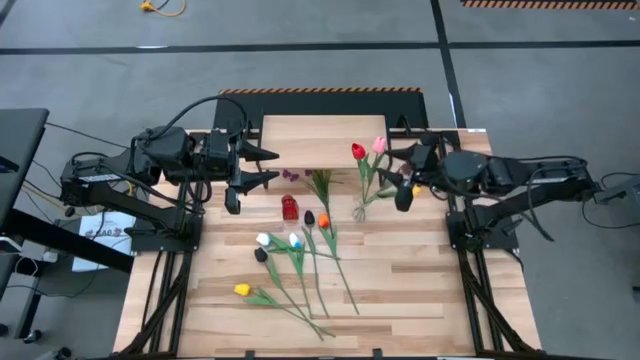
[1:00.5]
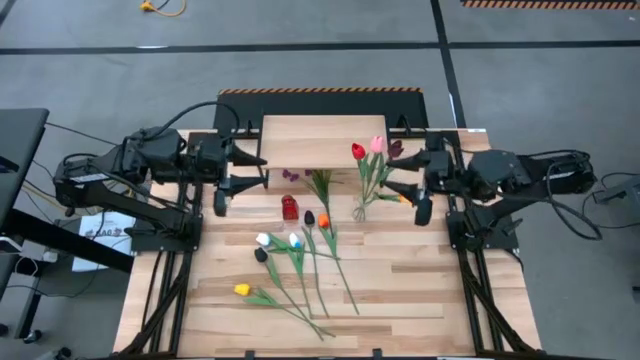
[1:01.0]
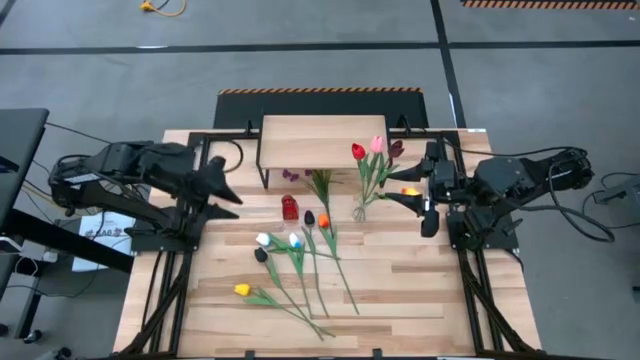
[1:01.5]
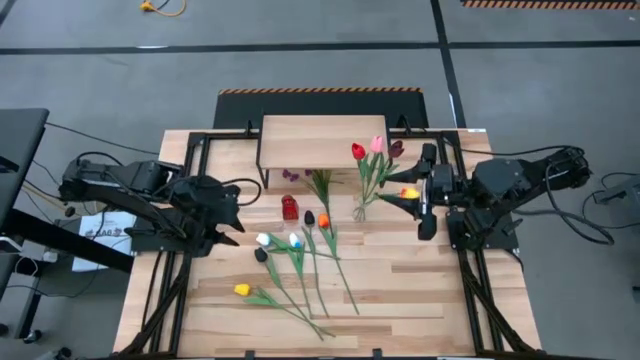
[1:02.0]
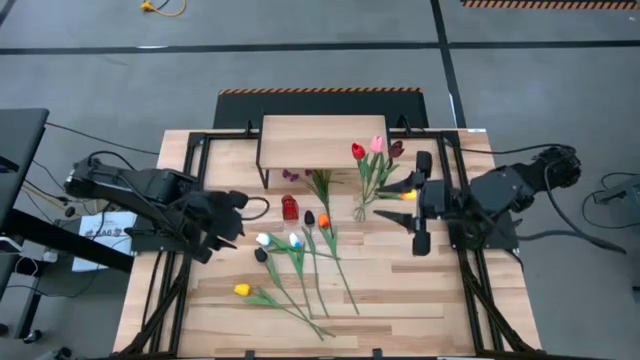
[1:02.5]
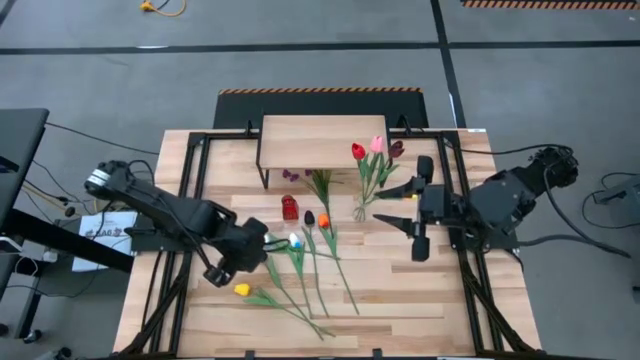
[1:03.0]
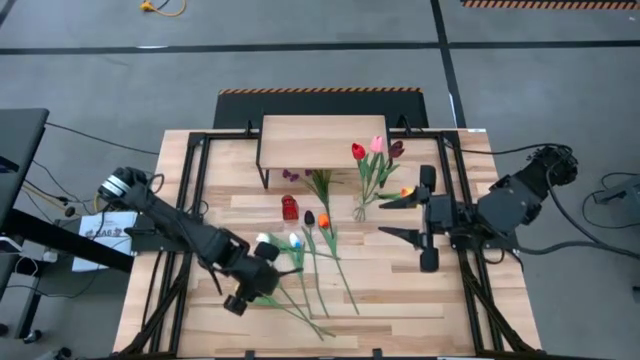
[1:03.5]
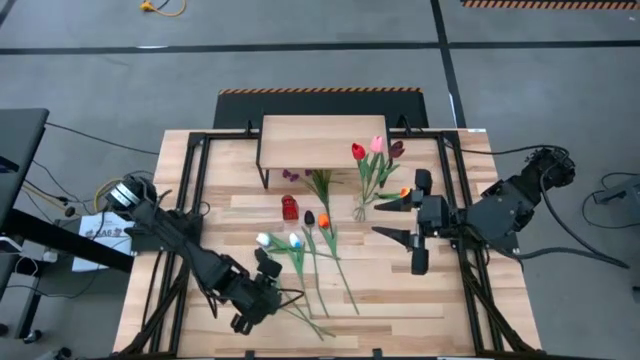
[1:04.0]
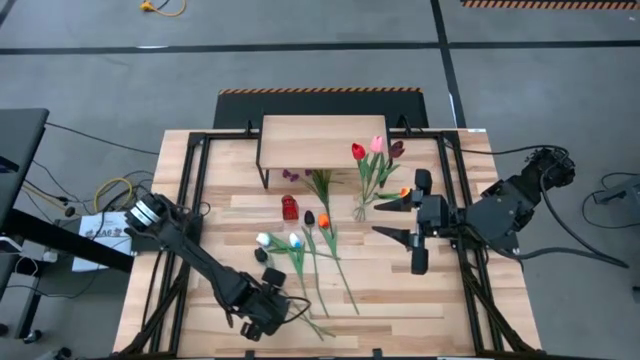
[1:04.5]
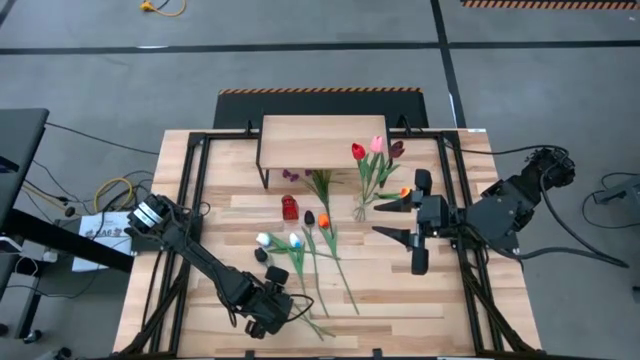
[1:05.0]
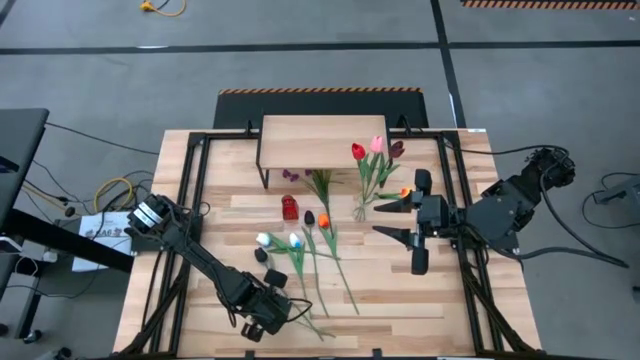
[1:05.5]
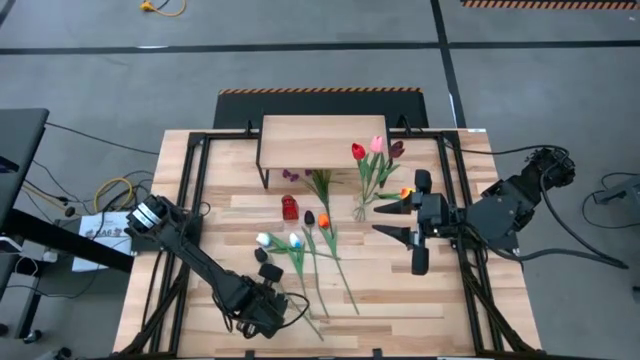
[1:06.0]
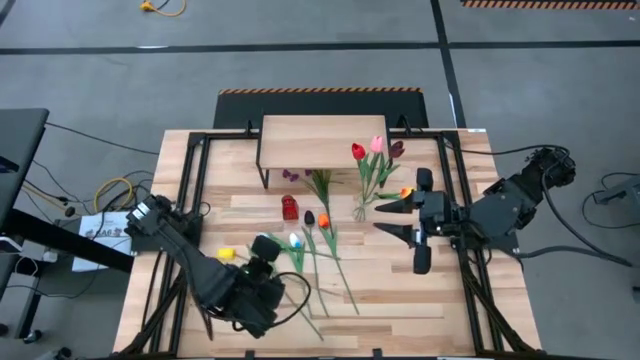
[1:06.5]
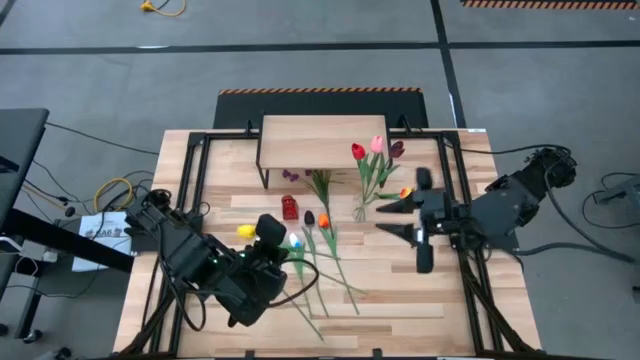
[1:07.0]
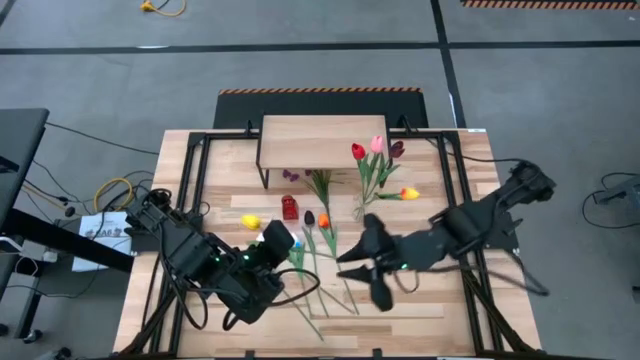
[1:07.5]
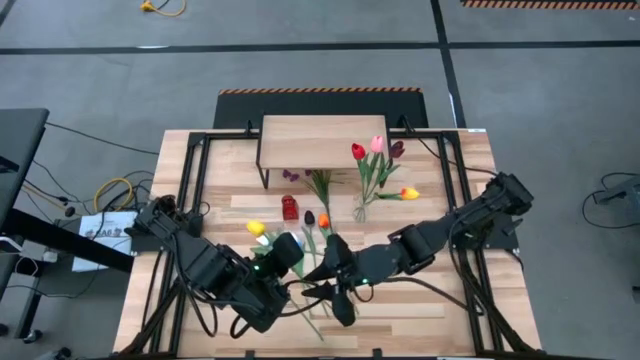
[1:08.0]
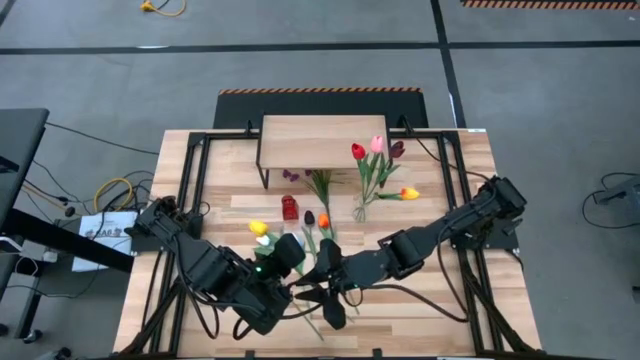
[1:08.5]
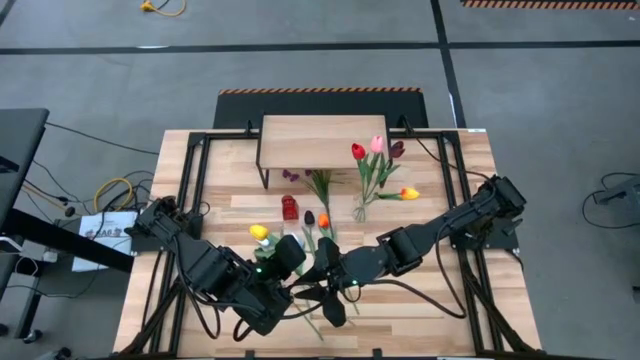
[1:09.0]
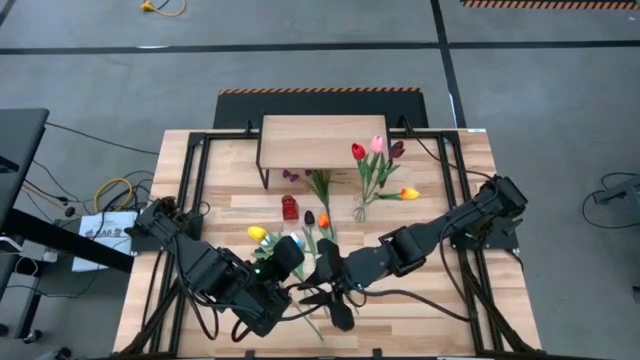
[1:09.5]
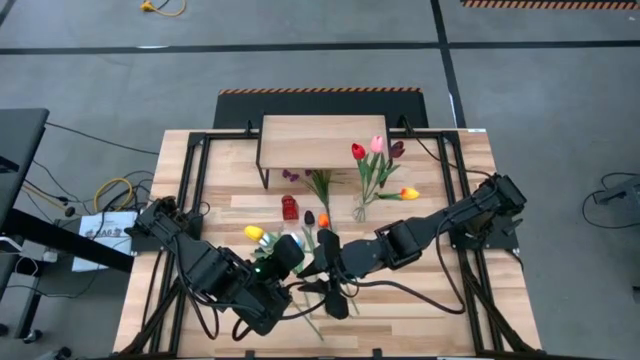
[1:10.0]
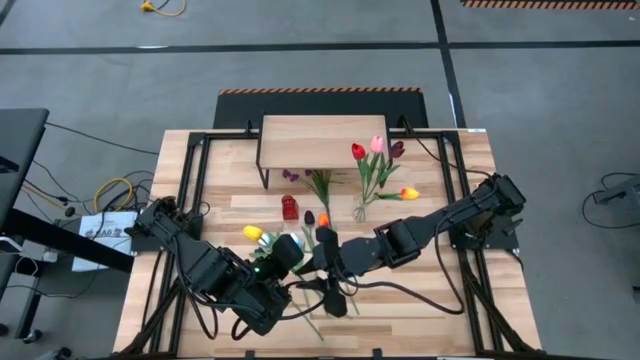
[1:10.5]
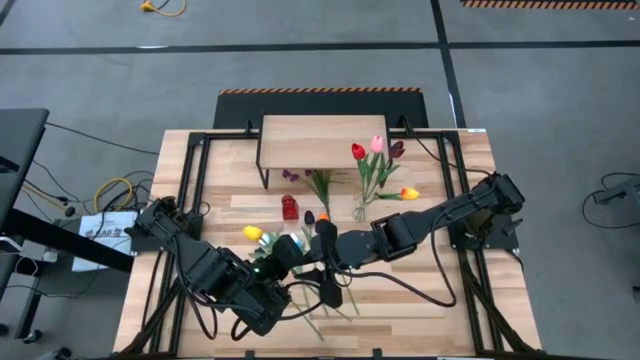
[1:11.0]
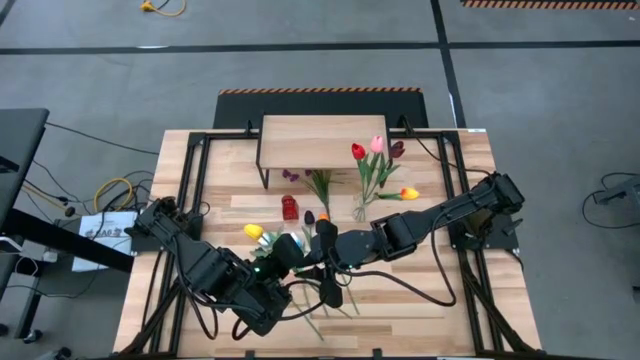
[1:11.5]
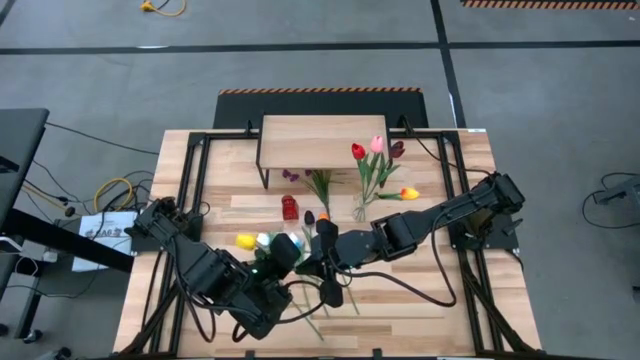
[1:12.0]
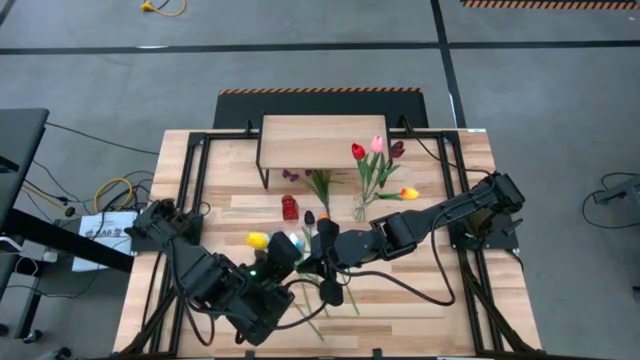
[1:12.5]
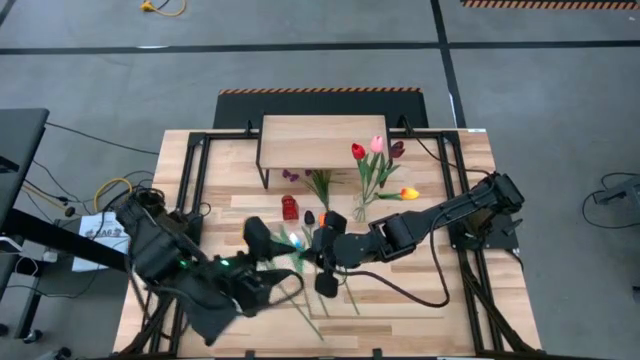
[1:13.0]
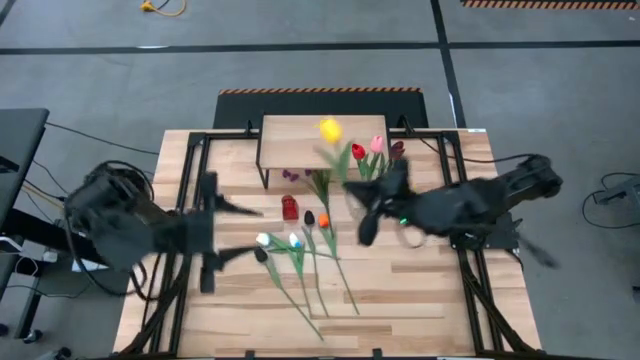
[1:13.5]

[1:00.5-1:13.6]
Task: Pick and place flowers into a vace then onto a shelf
Put the yellow tulip into the transparent vase

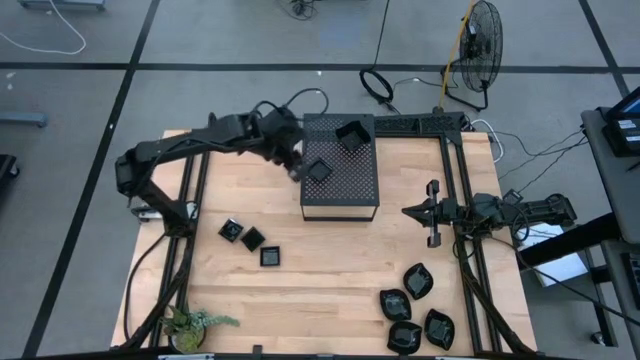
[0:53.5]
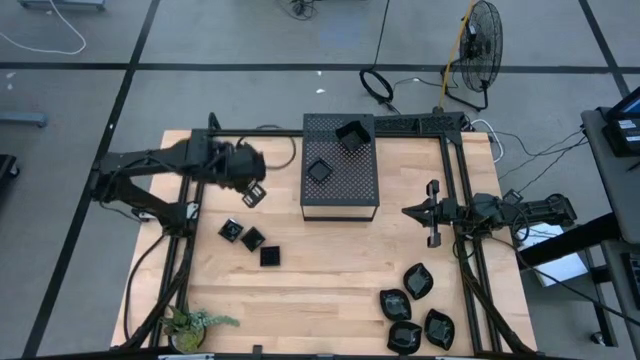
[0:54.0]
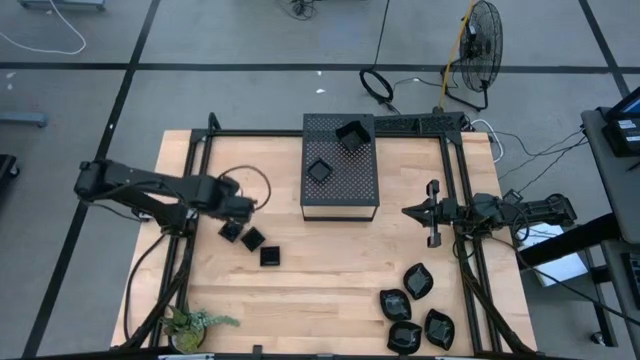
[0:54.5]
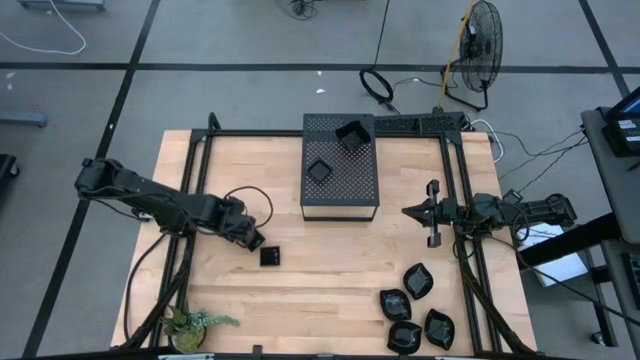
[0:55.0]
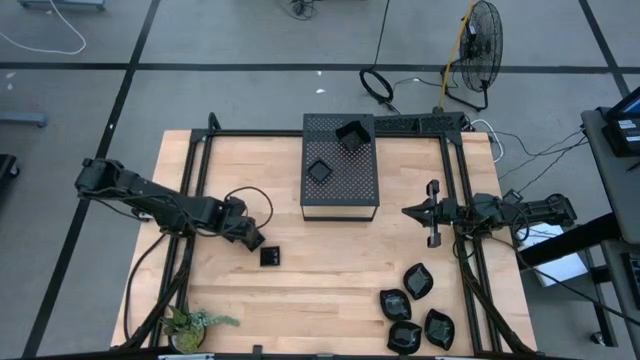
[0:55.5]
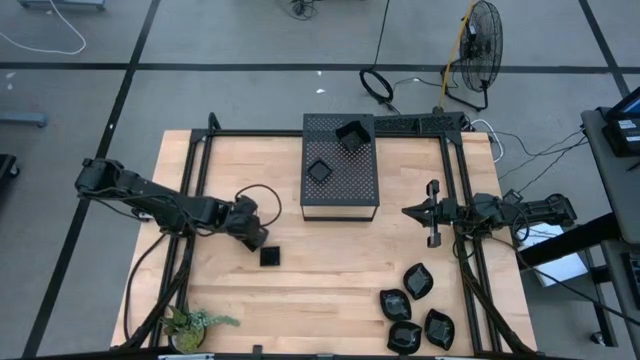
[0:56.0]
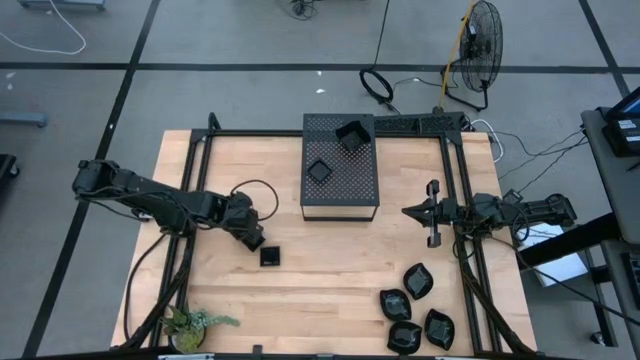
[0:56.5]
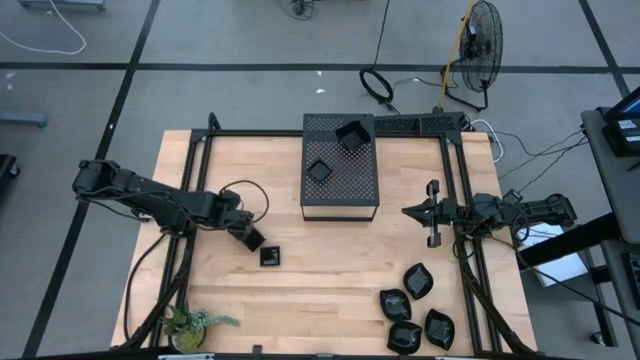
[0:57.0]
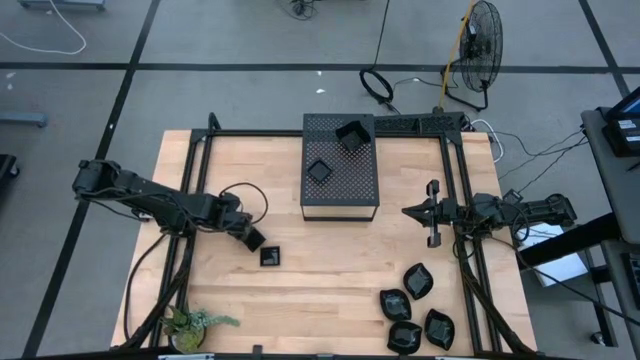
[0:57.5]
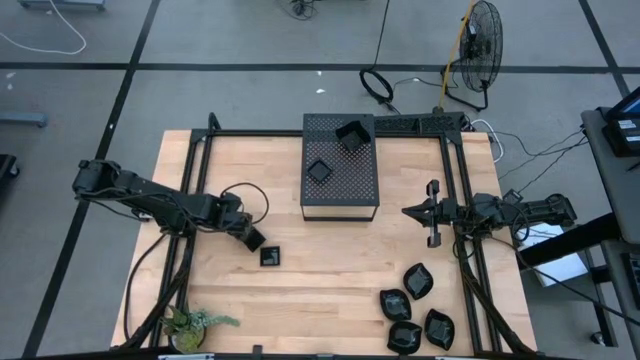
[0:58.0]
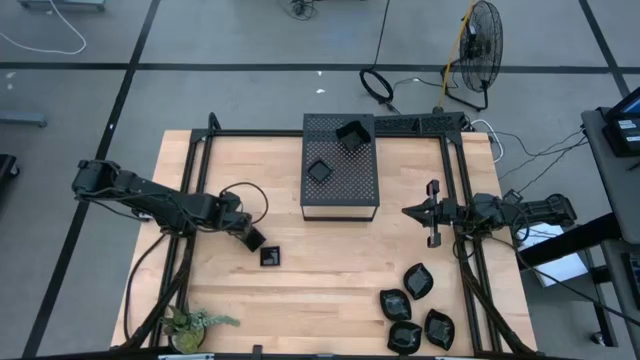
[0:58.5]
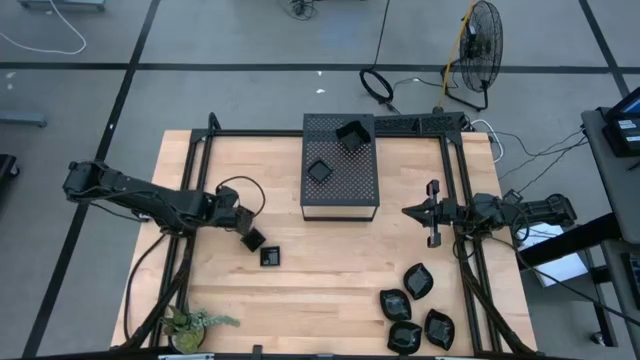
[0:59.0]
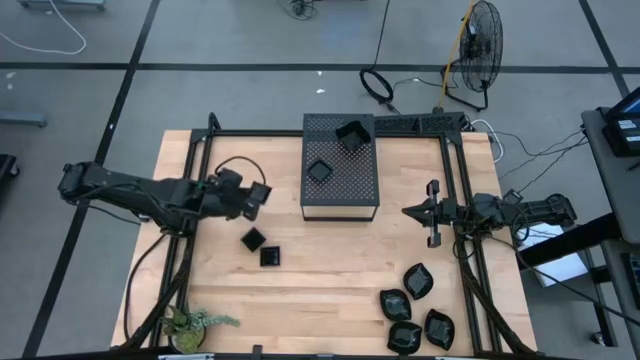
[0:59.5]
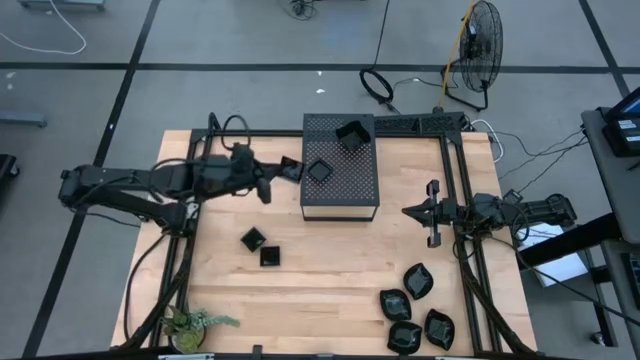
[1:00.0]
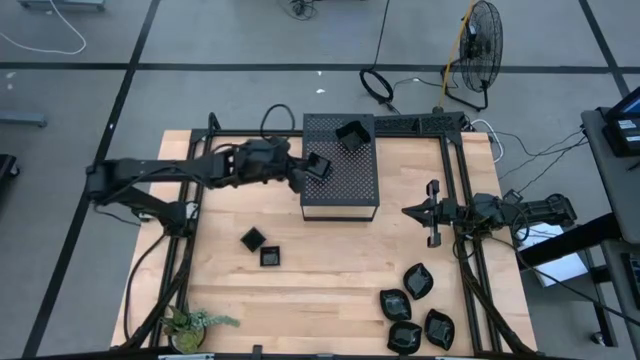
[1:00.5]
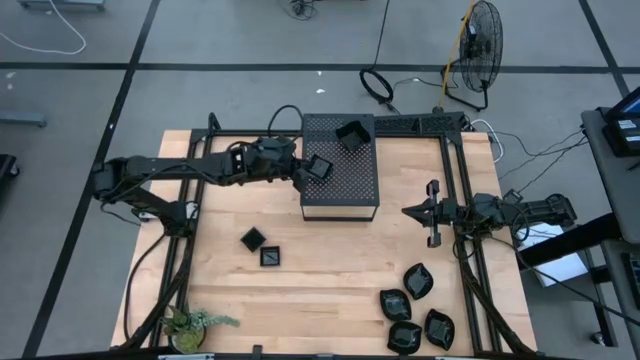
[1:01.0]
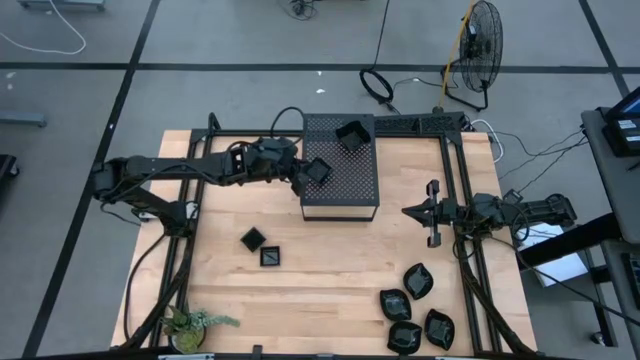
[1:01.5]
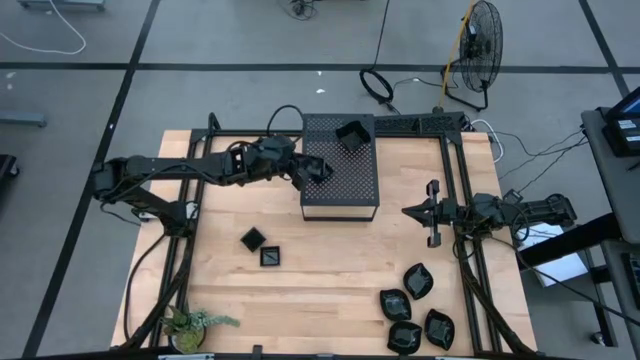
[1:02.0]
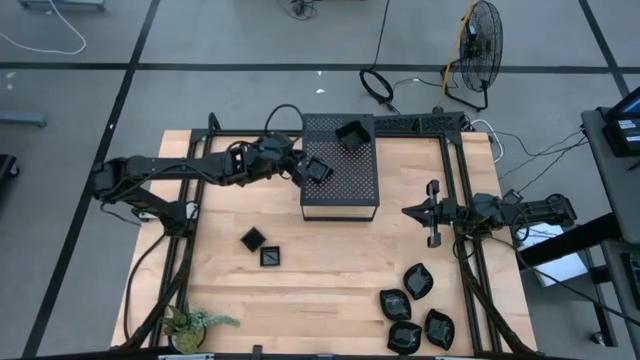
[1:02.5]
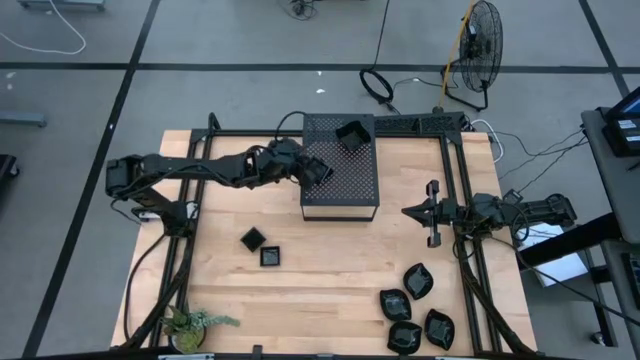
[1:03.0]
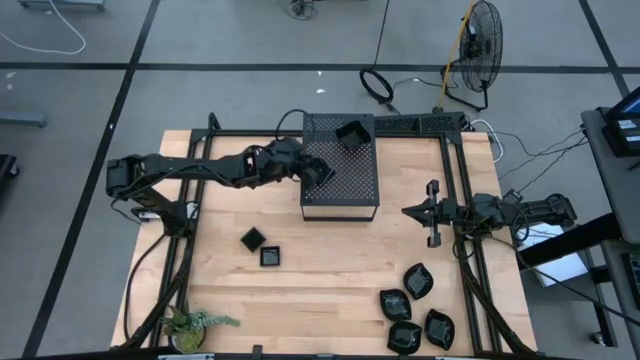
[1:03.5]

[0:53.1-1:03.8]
Task: Pick & Place Mini shaped plates
Stack the square plate on top of the square plate on the shelf
